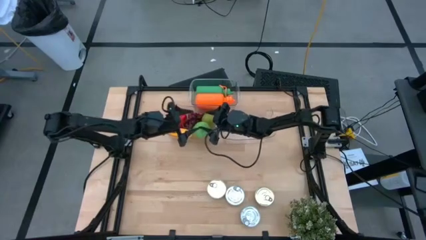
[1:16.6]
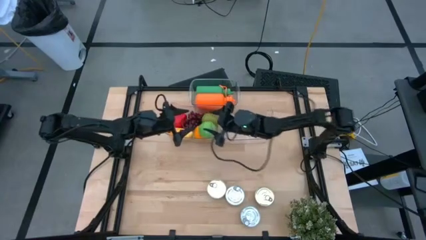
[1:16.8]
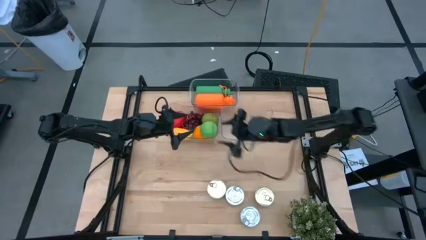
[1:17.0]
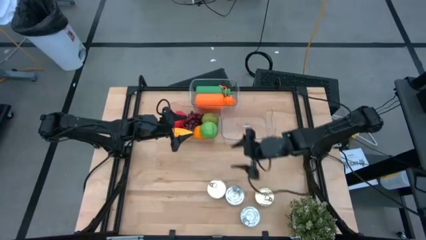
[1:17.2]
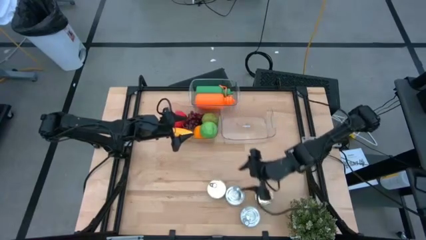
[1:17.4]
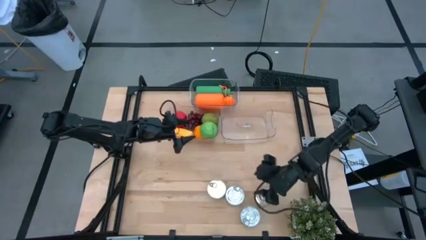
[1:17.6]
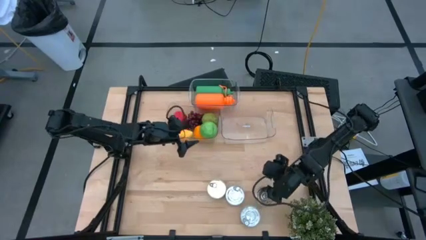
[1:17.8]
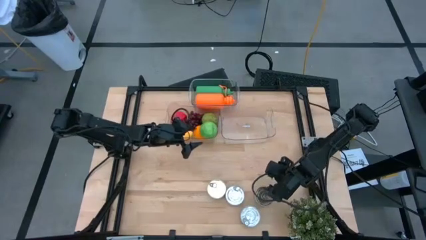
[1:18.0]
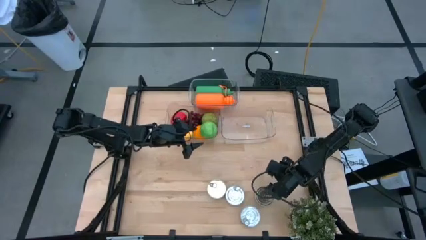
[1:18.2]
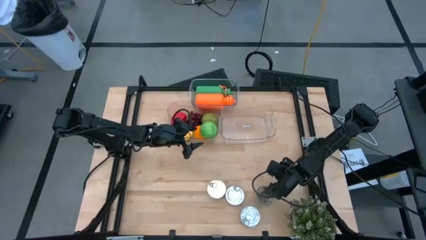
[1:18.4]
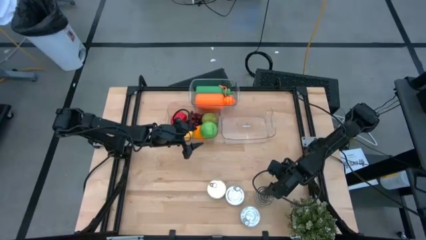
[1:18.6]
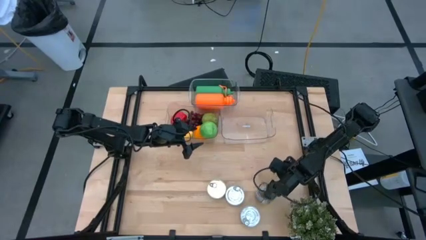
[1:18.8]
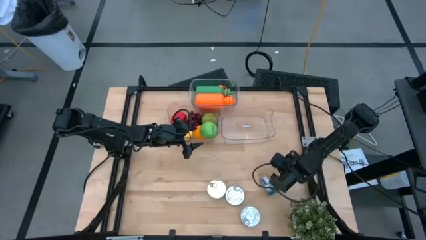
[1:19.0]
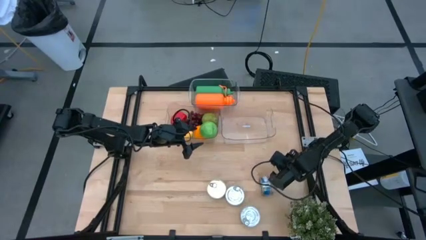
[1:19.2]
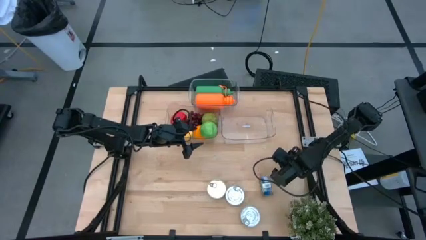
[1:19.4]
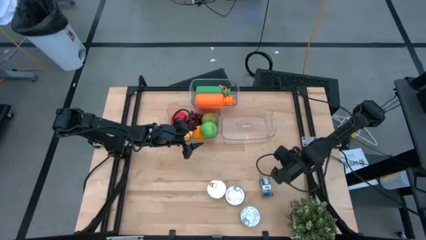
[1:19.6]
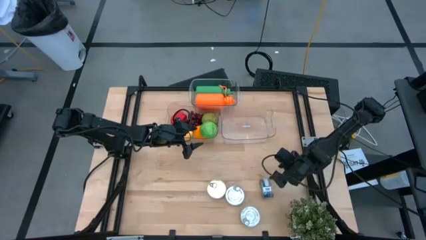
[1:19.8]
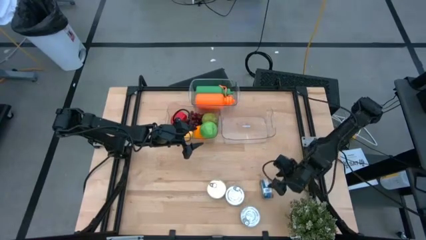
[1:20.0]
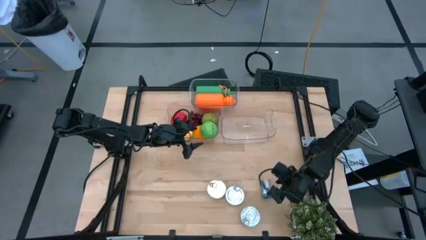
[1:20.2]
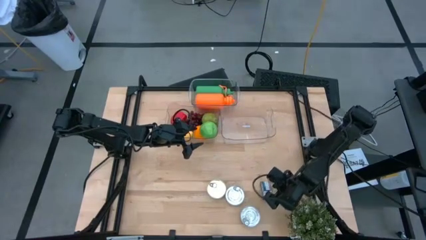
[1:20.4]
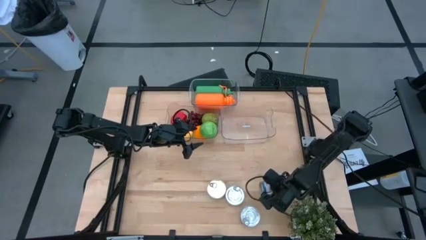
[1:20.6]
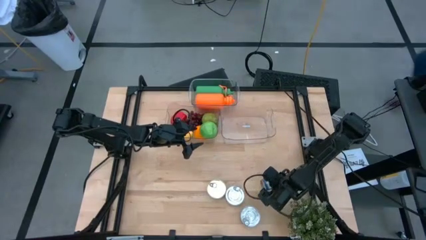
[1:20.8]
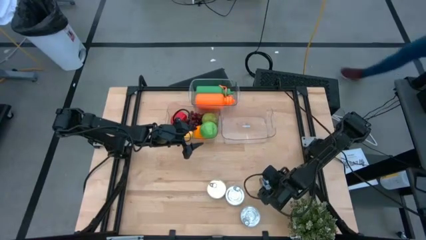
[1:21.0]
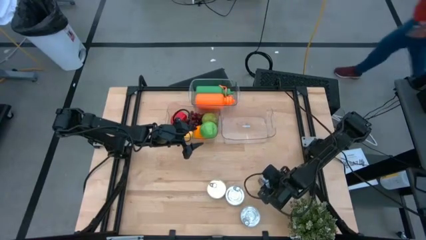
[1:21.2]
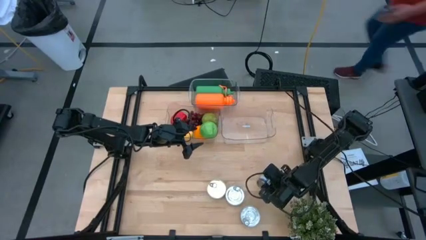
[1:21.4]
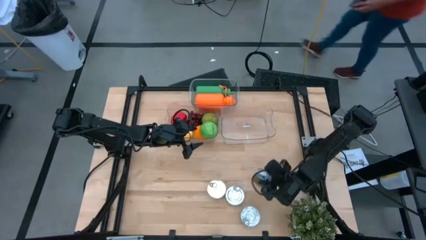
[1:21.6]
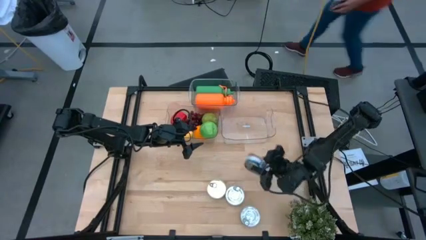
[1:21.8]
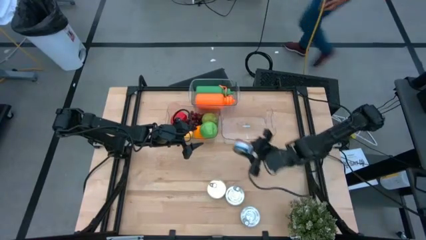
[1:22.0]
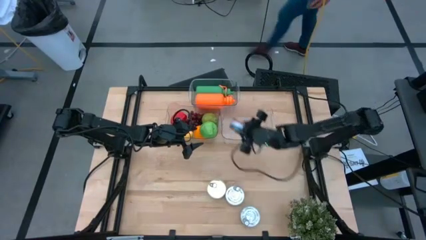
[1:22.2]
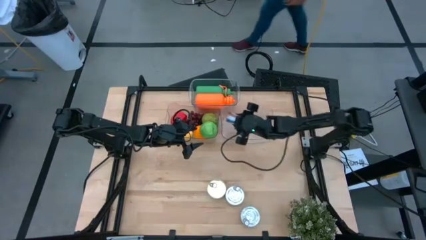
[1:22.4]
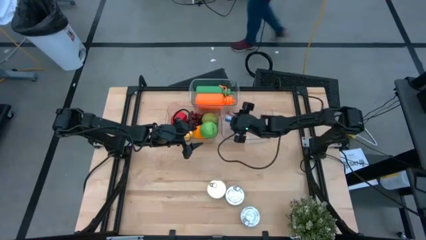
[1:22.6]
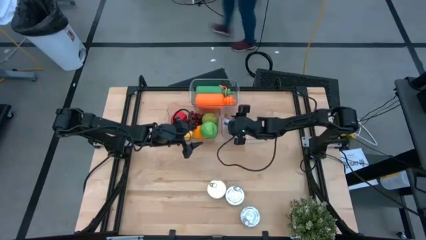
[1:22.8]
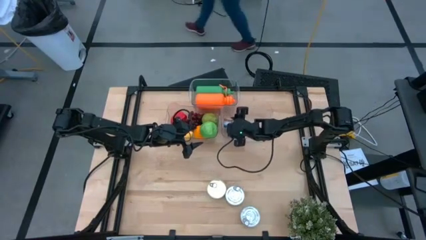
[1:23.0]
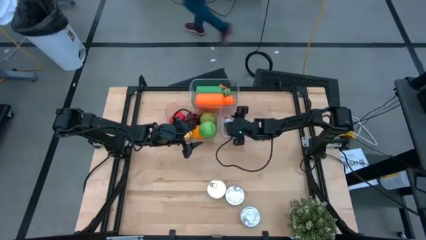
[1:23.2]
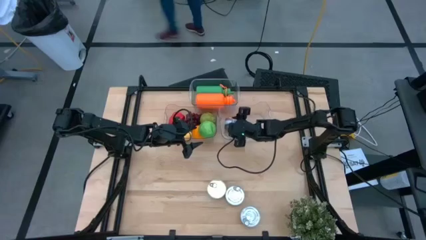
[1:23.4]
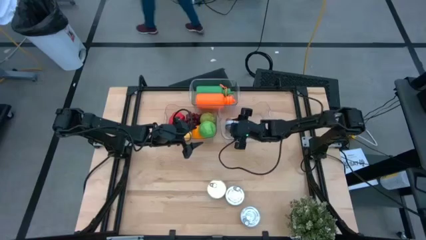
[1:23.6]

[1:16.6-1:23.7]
Task: Pick & Place Food Item
Put the left blue and pink tuna can into the bottom right transparent bin

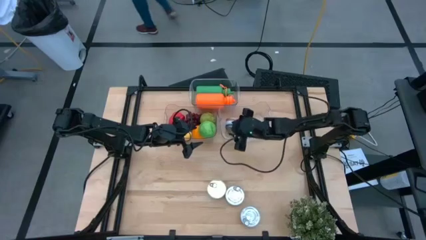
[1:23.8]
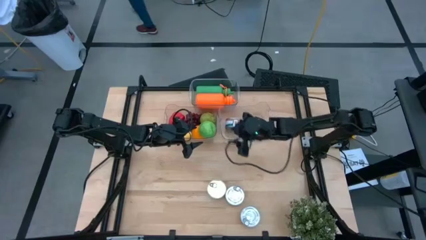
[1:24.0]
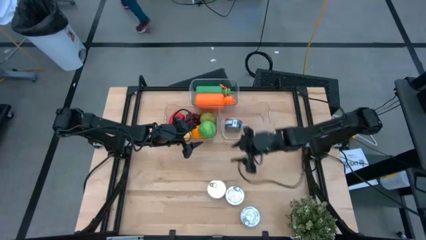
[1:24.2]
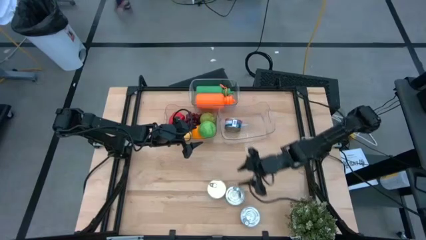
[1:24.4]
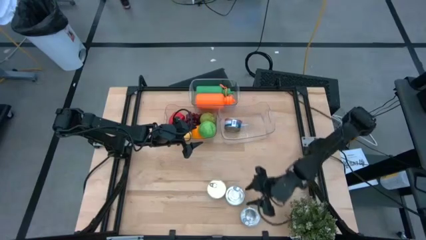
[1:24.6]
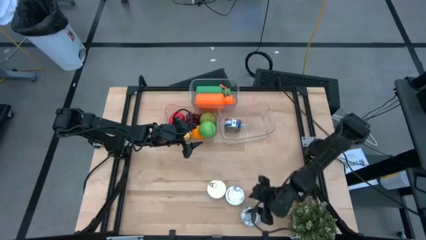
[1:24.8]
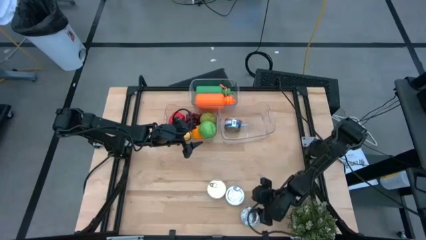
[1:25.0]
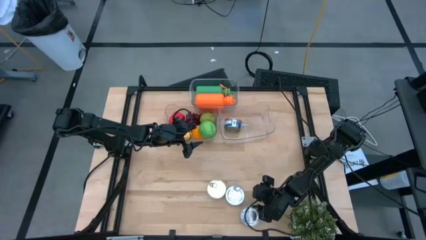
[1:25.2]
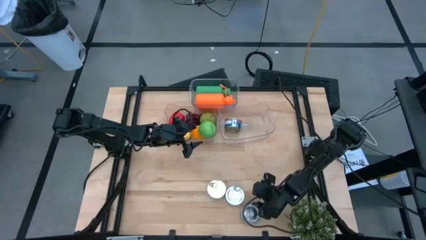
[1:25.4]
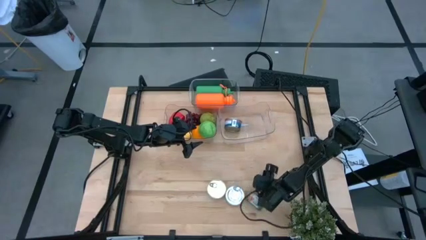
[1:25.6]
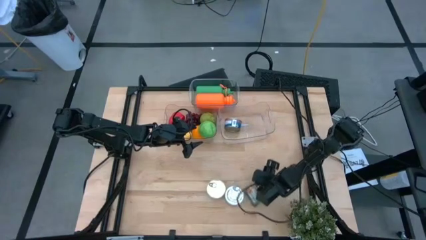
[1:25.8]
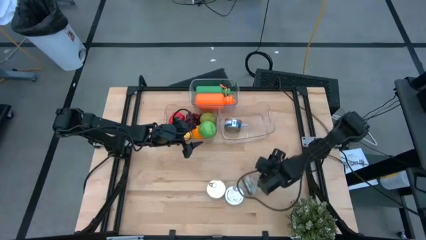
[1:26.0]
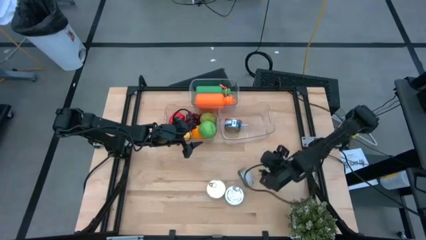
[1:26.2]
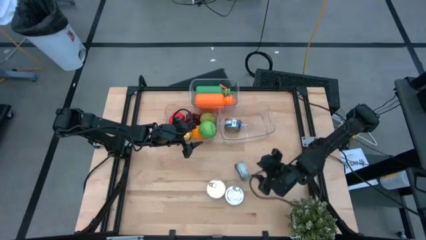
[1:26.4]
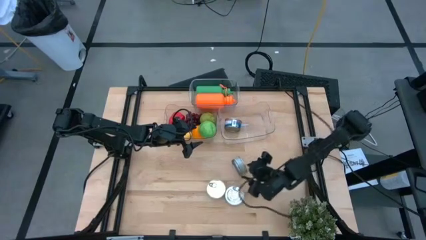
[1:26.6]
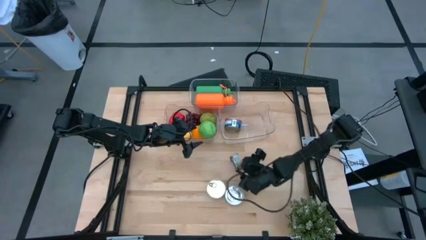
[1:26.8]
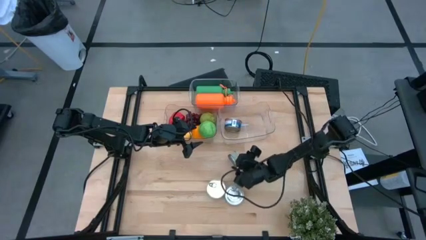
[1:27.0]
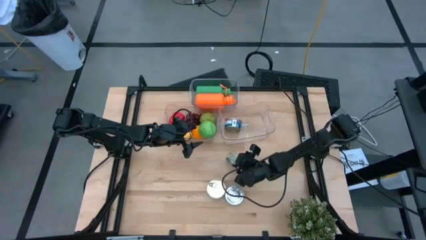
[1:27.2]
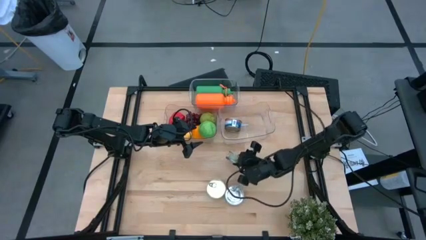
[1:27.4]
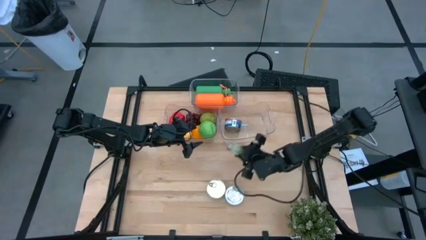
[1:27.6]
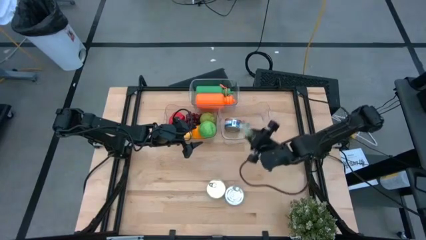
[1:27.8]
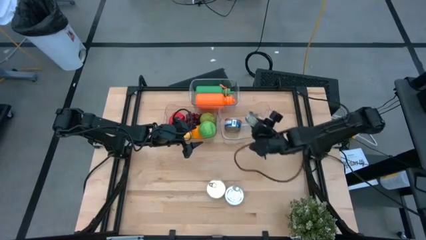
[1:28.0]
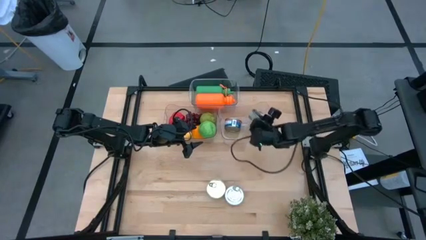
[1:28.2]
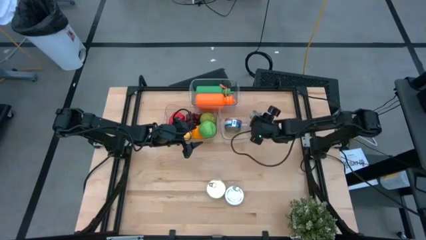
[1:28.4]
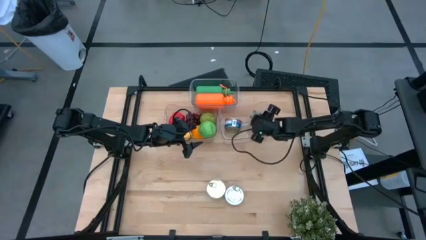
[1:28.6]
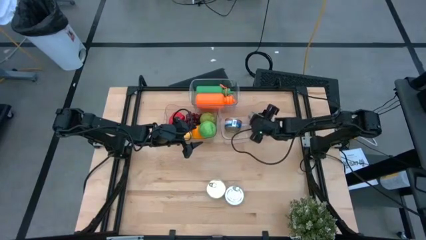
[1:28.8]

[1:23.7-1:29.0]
Put the bottom green tuna can into the bottom right transparent bin

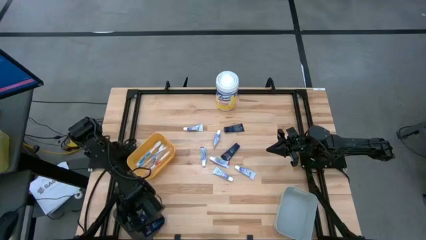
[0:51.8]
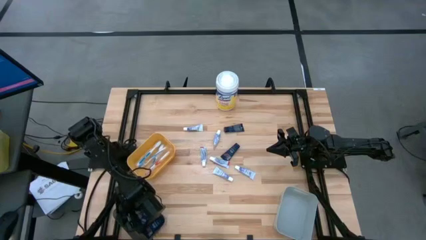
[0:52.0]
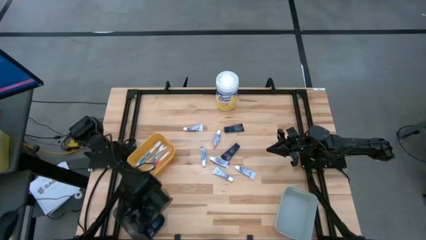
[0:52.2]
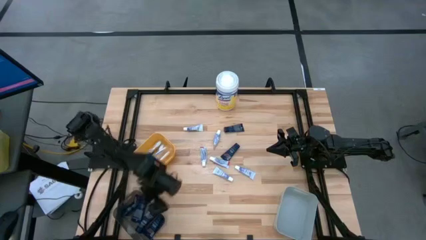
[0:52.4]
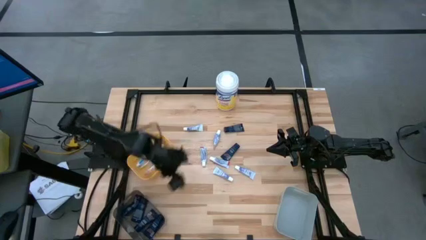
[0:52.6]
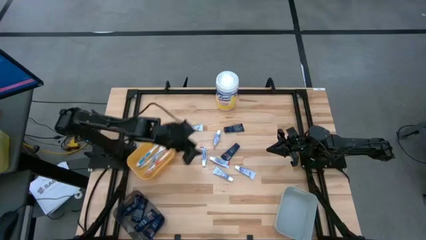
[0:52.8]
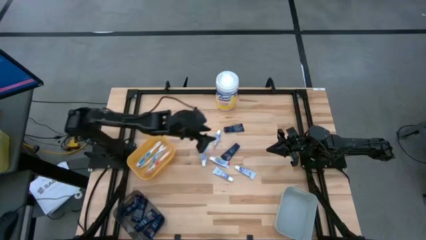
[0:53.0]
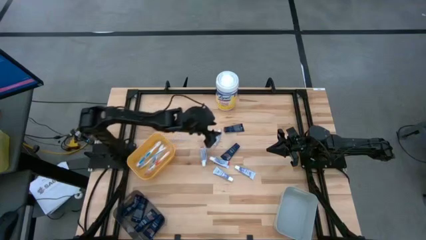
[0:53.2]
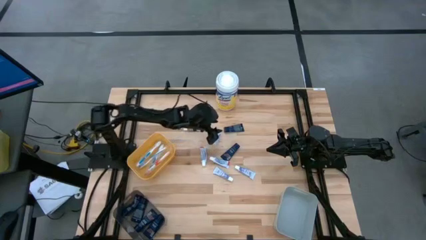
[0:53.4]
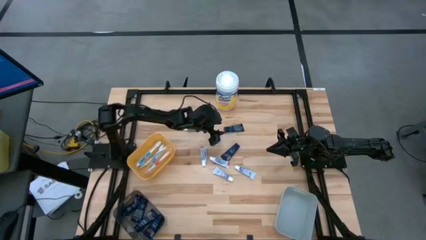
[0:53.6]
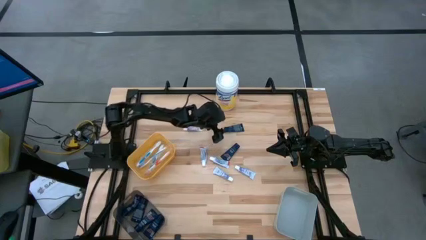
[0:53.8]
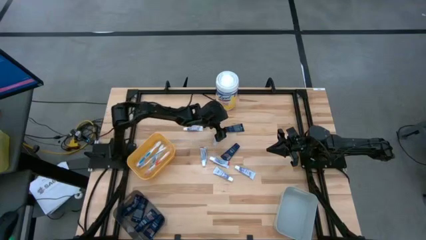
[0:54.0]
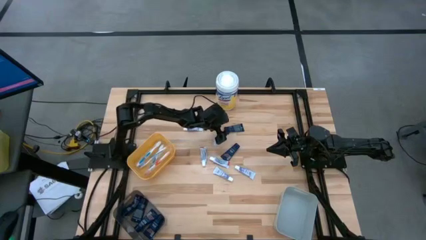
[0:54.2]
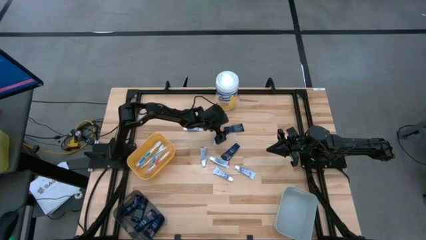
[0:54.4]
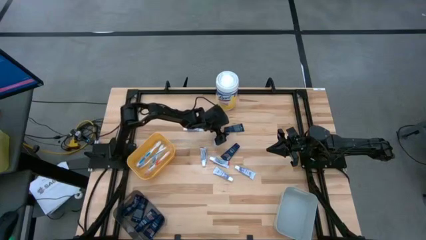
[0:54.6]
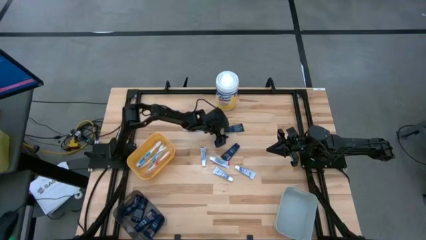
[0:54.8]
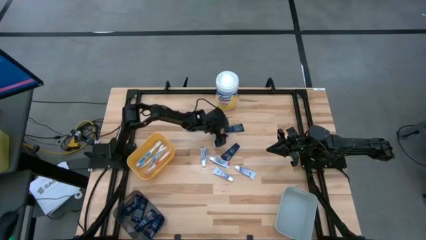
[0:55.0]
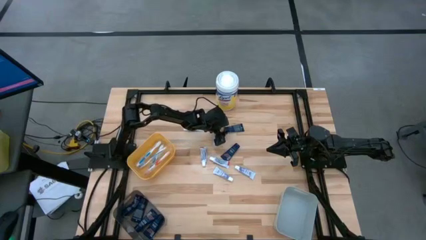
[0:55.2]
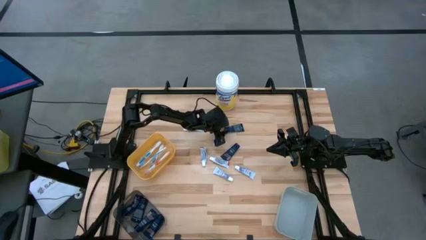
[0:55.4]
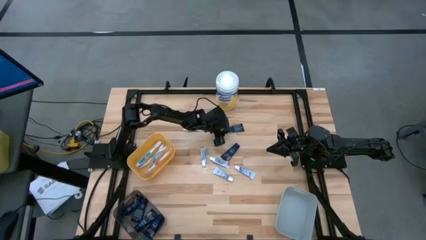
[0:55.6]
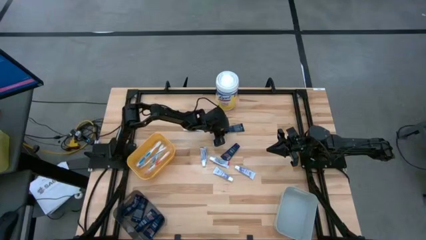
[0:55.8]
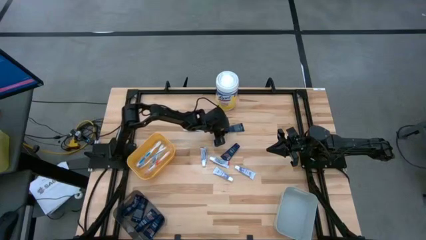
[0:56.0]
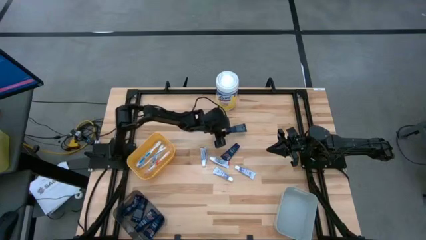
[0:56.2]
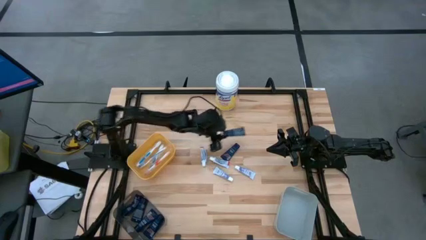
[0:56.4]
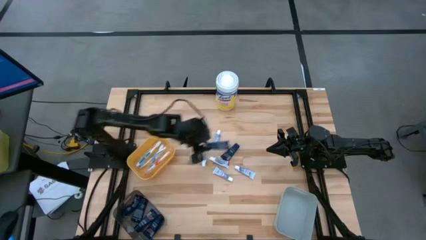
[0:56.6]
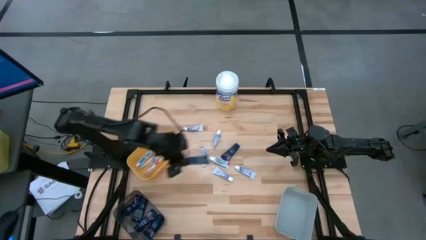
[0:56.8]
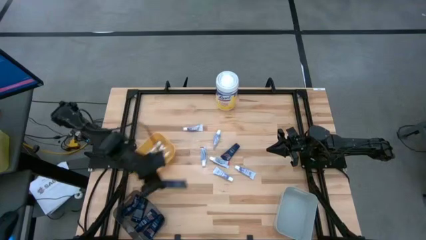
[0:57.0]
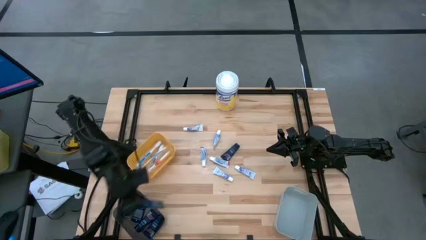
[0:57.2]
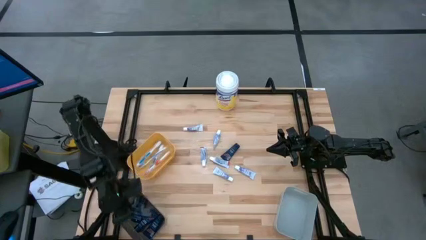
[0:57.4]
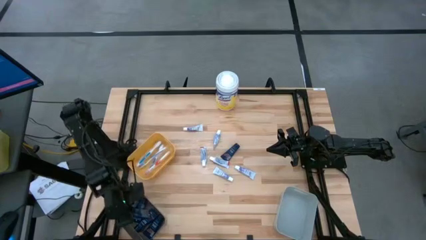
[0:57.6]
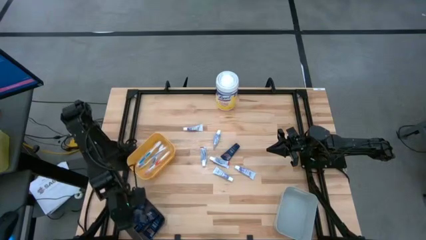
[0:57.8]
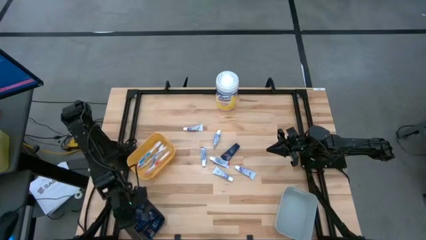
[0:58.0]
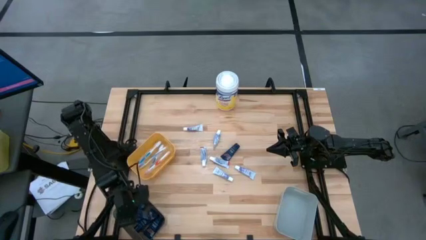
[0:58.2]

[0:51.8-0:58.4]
Task: Pick & Place Travel size toiletries
Put the blue shave cream into the black transparent bin
